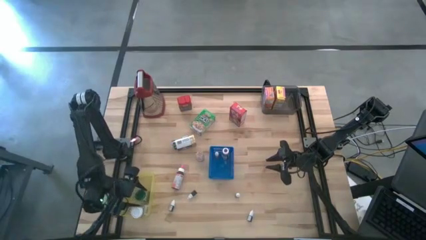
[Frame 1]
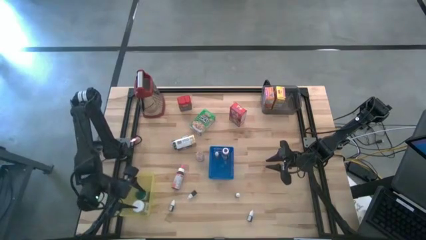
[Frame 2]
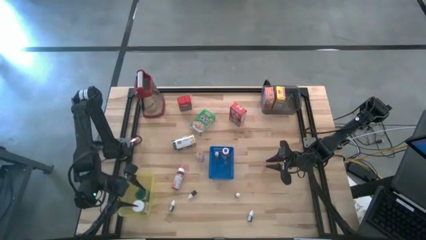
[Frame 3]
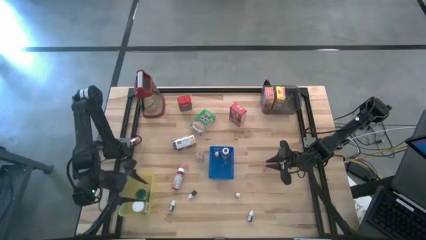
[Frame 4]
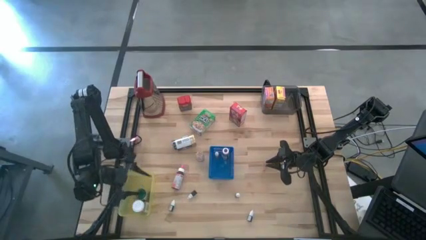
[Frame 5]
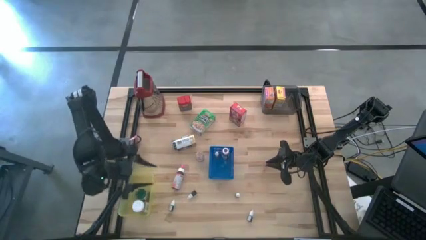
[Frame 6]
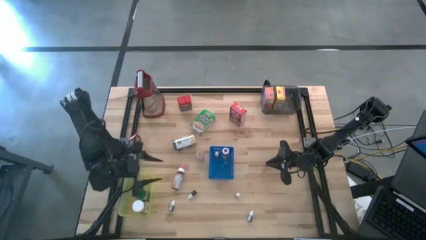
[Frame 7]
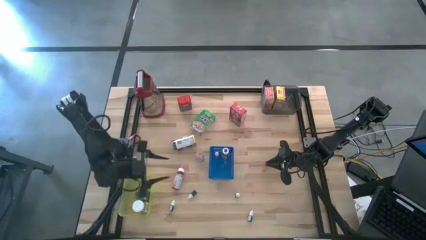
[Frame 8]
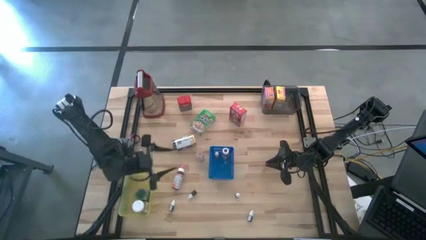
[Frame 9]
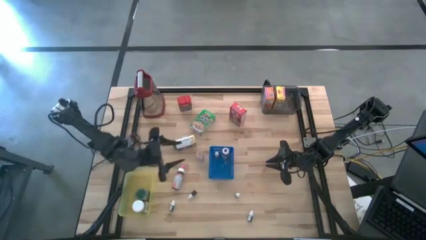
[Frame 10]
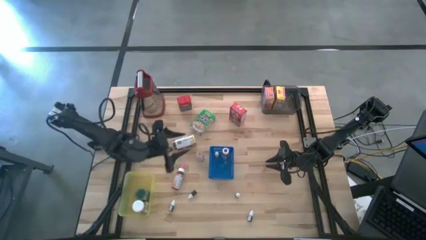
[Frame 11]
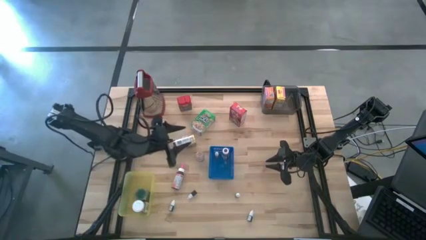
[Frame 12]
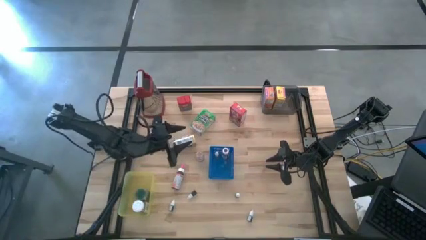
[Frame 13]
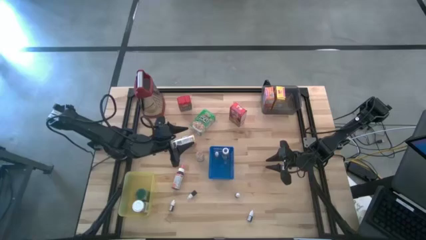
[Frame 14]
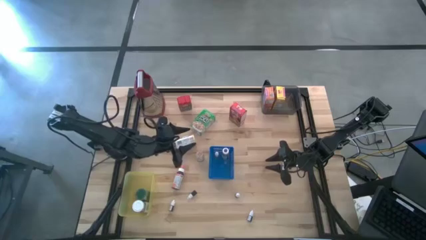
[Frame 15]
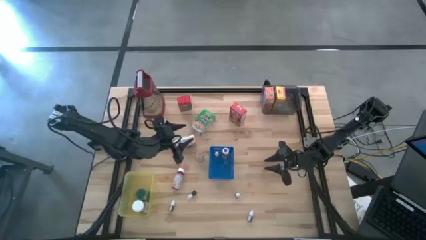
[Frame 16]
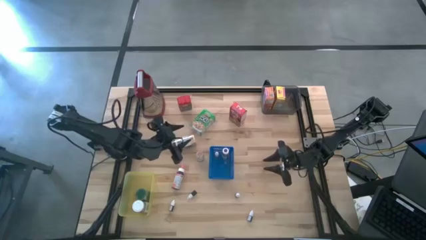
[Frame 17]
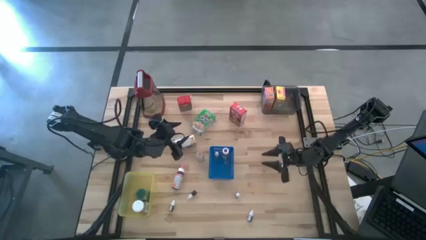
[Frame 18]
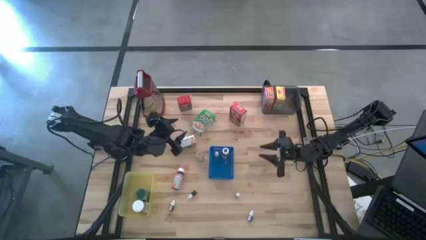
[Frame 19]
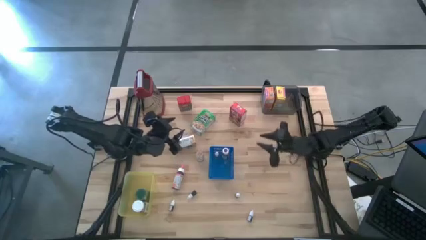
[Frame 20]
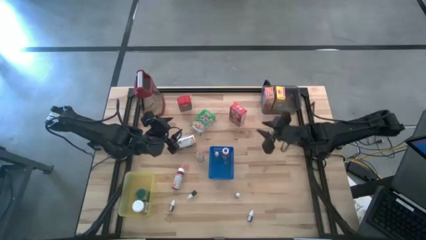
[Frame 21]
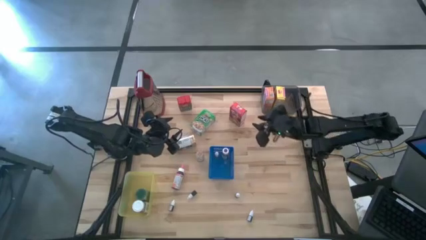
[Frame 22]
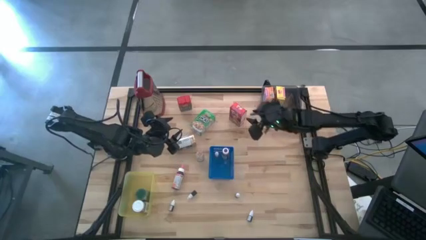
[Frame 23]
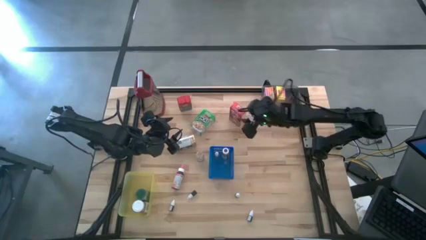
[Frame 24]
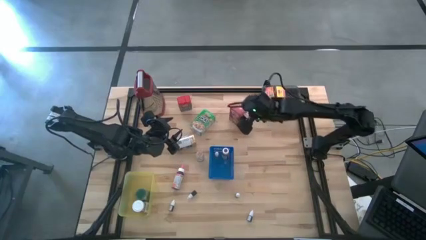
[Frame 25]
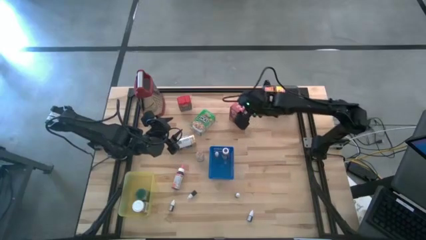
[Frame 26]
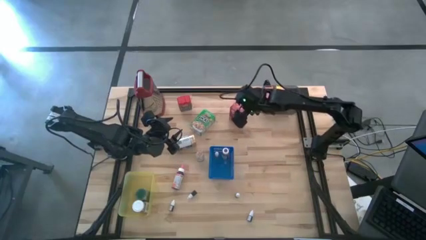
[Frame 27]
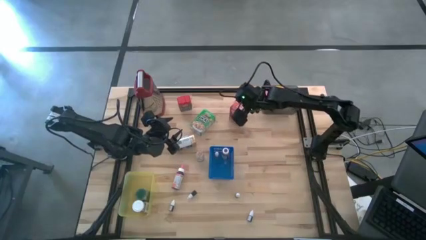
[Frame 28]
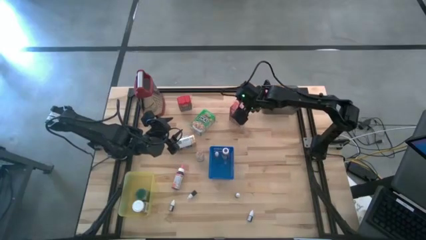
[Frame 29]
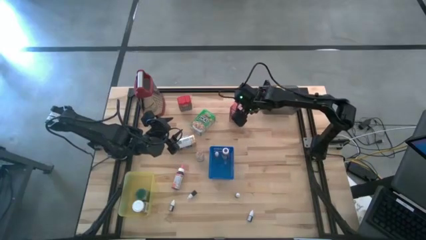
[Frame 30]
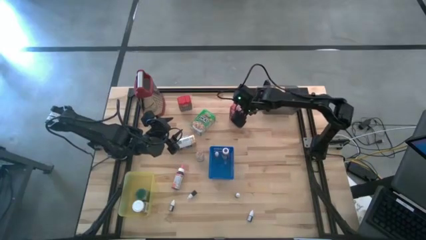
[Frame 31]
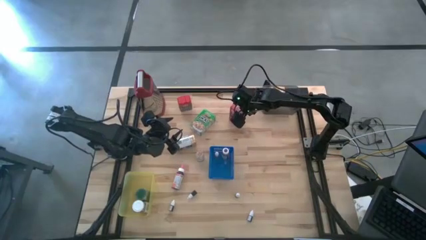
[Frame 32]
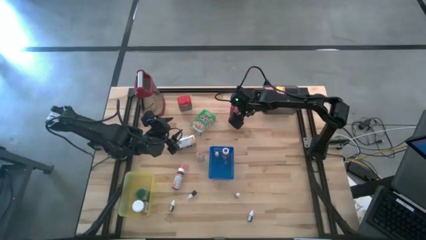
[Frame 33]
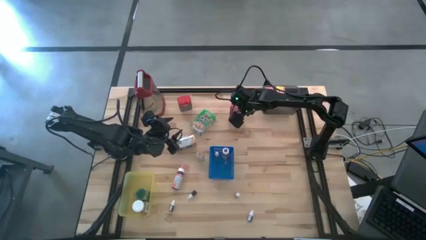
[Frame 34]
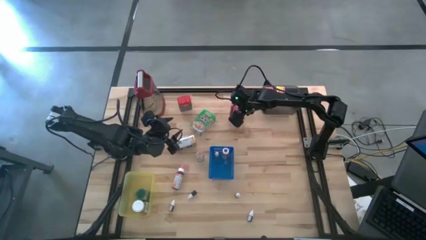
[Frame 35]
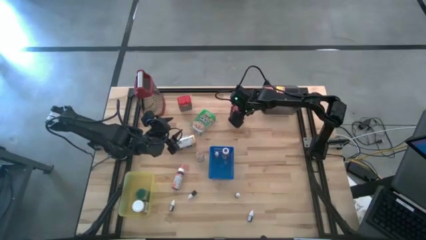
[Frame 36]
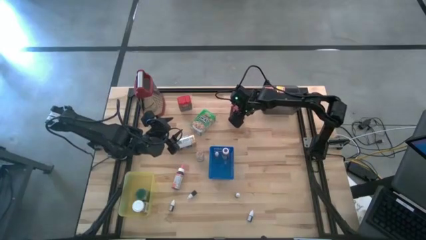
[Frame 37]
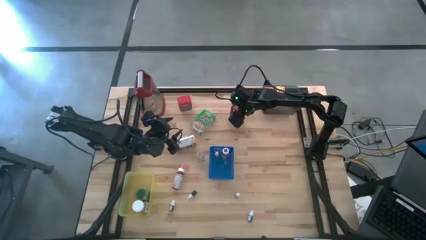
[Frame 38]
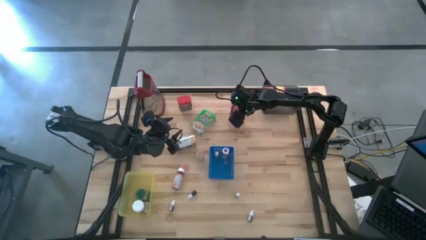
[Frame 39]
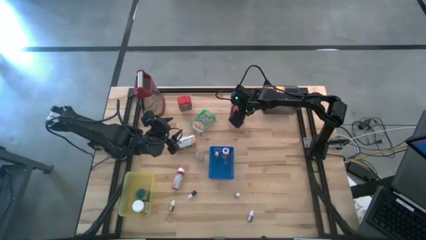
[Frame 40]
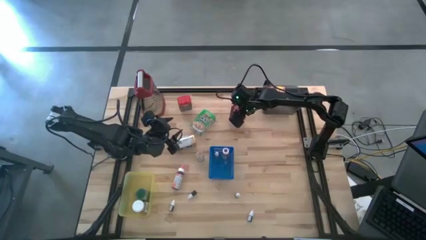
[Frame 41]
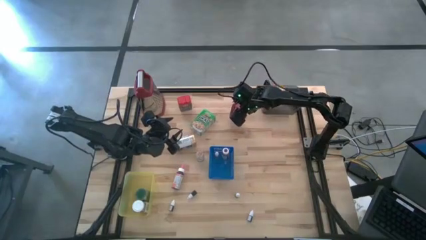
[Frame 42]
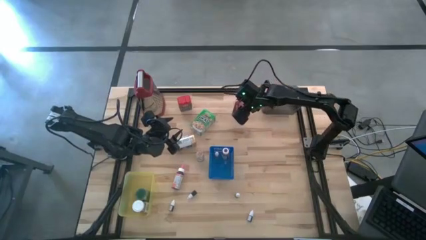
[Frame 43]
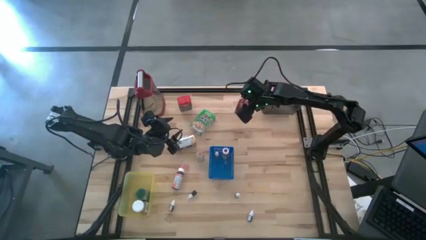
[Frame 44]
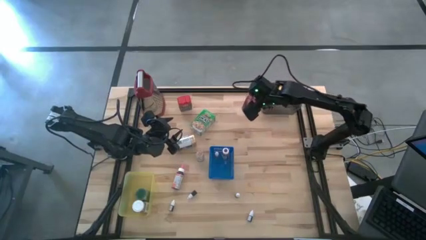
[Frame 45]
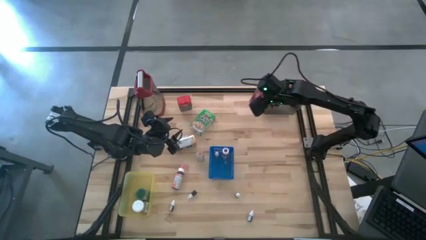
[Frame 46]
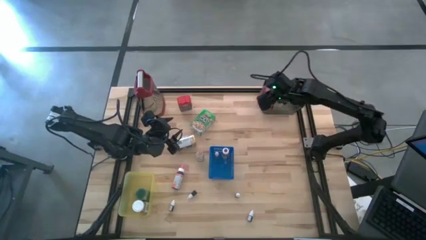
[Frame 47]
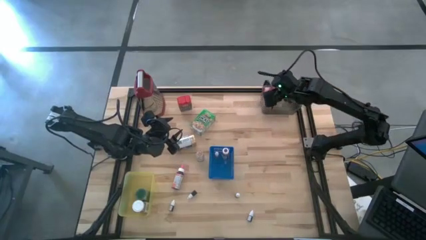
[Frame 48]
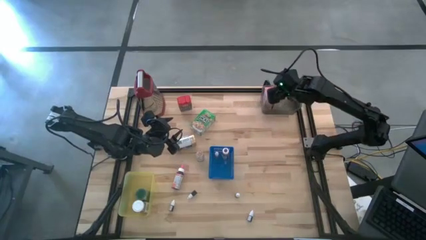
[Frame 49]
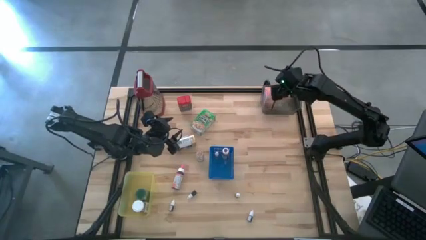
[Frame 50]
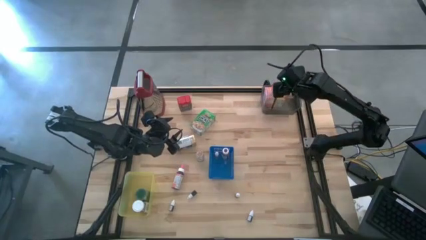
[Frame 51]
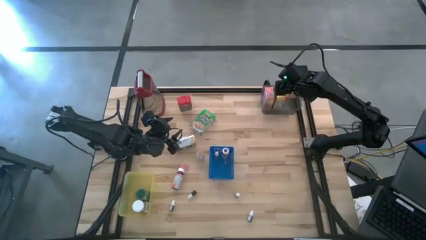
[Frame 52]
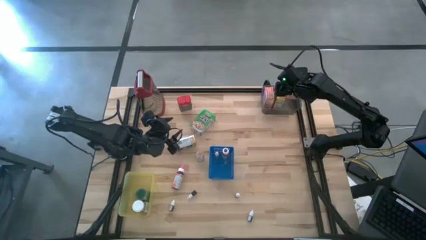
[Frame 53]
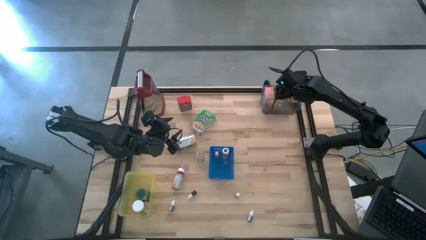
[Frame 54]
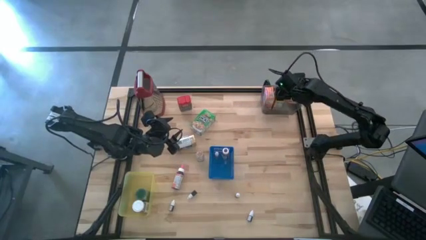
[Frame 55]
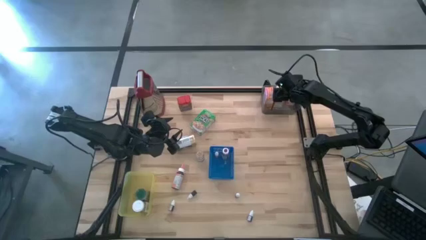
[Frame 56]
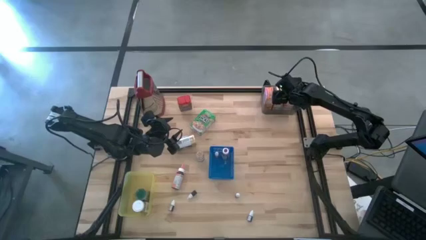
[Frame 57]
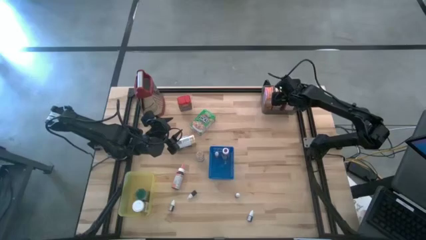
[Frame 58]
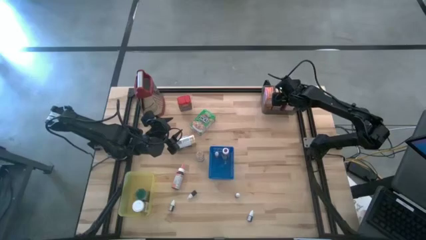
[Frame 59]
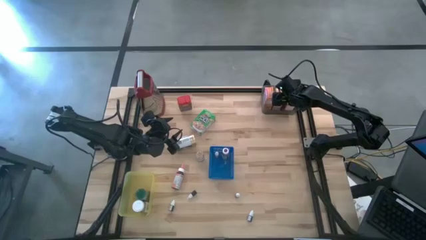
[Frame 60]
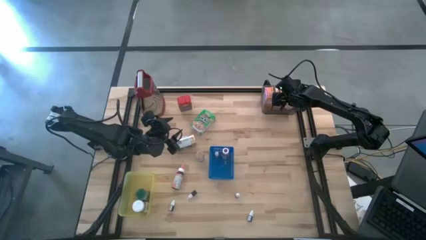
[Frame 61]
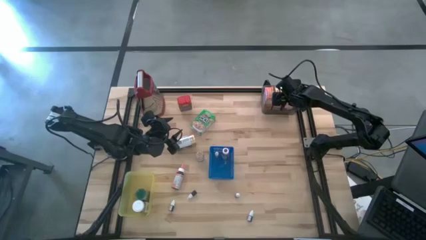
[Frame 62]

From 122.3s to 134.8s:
Task: Pick & Place Kitchen Items
Put the red cereal box into the black bin
